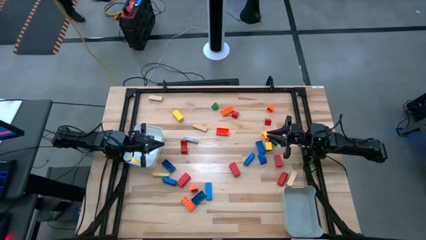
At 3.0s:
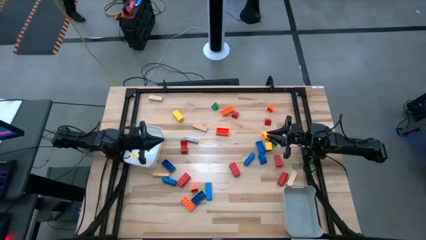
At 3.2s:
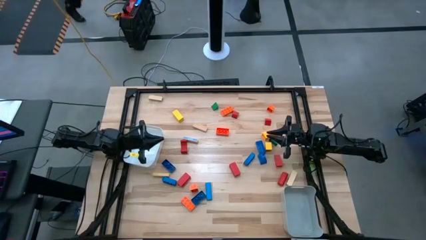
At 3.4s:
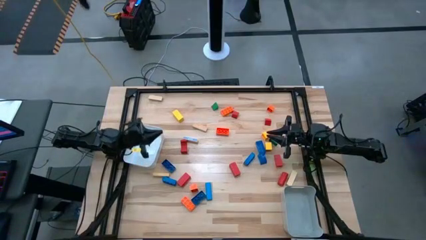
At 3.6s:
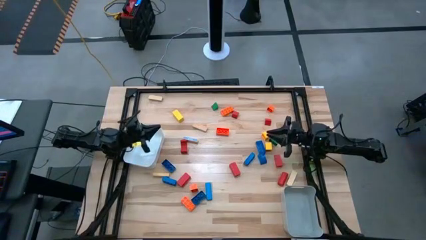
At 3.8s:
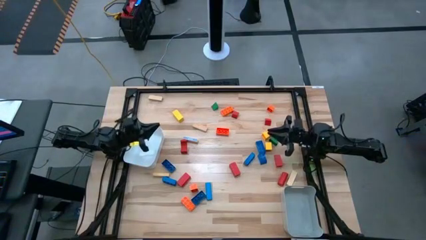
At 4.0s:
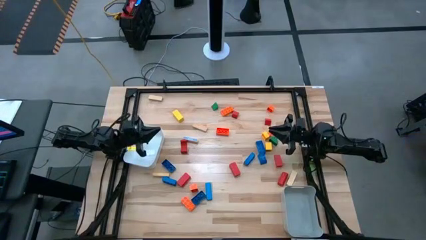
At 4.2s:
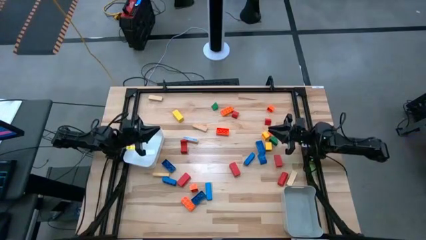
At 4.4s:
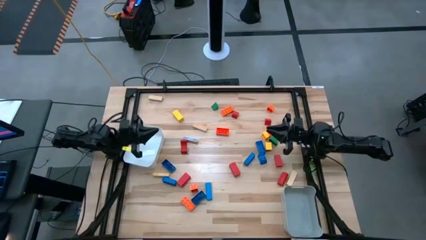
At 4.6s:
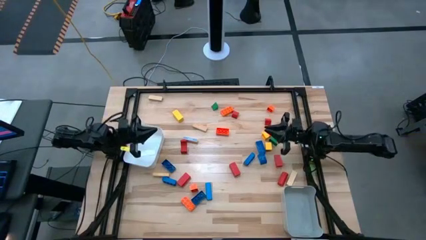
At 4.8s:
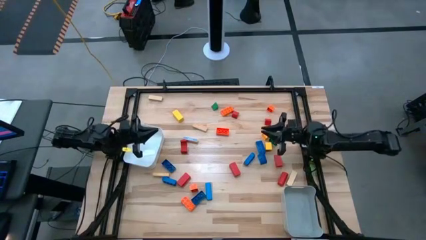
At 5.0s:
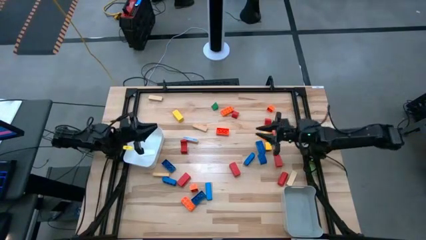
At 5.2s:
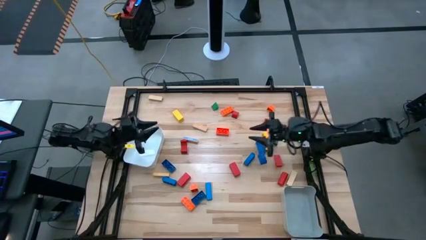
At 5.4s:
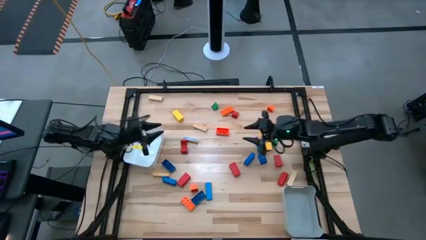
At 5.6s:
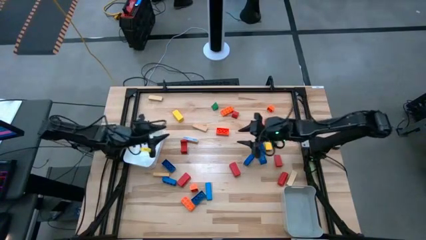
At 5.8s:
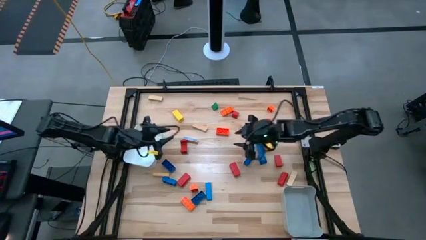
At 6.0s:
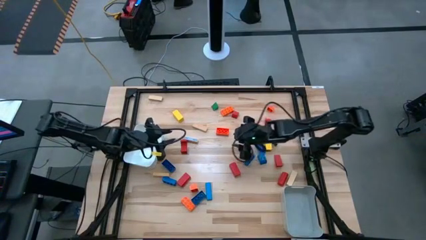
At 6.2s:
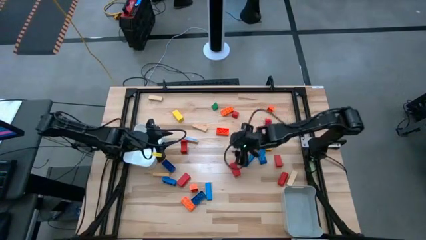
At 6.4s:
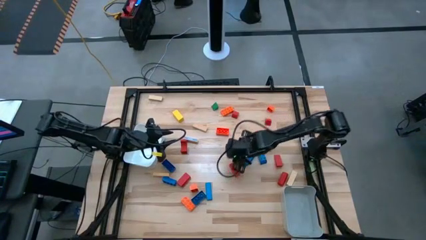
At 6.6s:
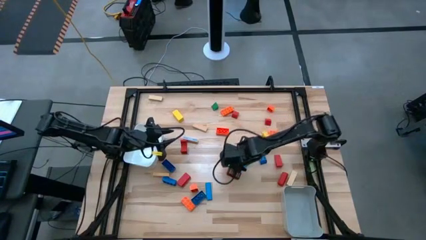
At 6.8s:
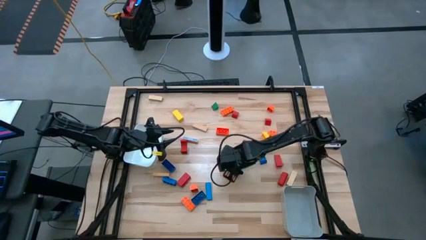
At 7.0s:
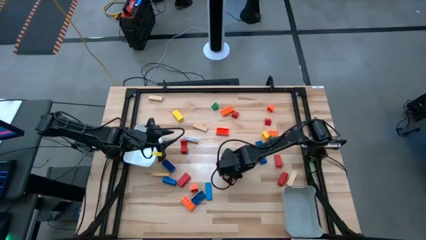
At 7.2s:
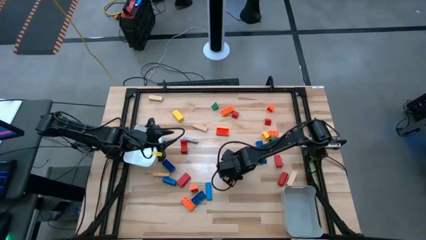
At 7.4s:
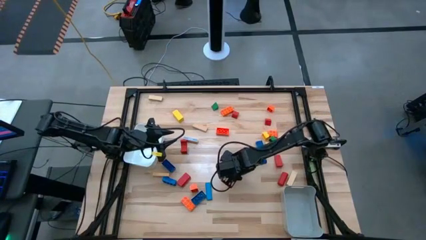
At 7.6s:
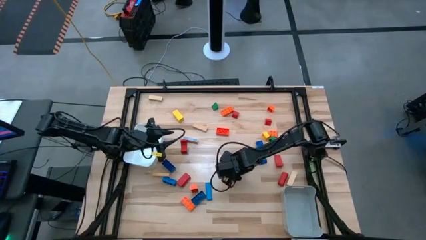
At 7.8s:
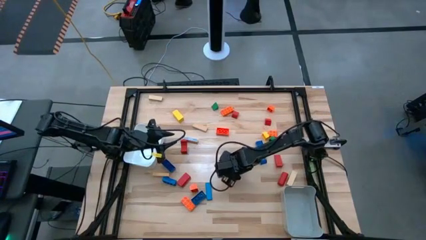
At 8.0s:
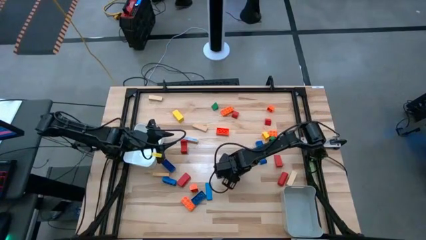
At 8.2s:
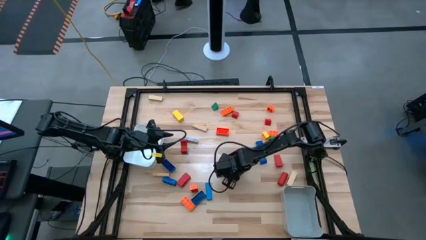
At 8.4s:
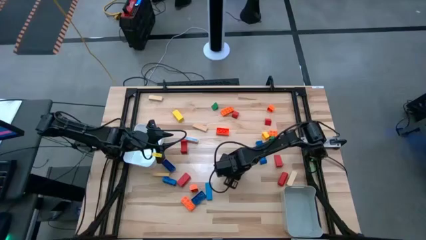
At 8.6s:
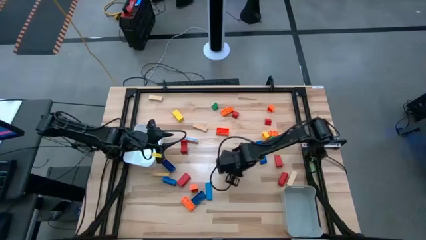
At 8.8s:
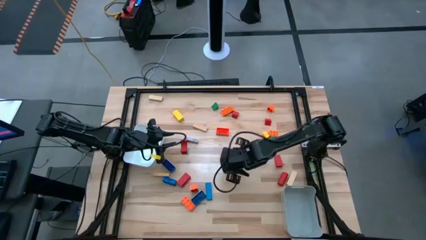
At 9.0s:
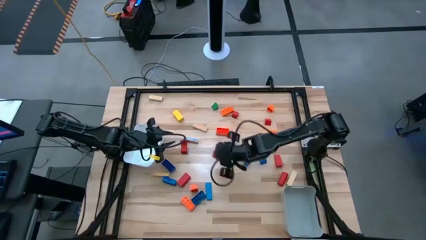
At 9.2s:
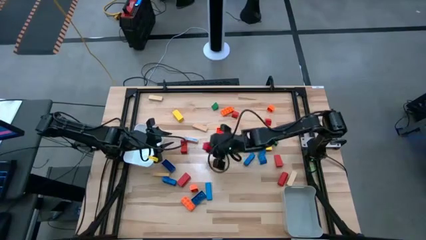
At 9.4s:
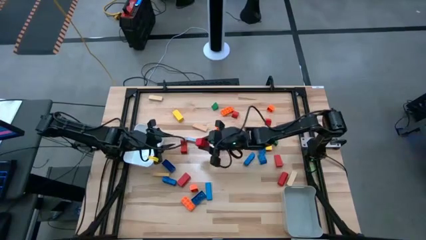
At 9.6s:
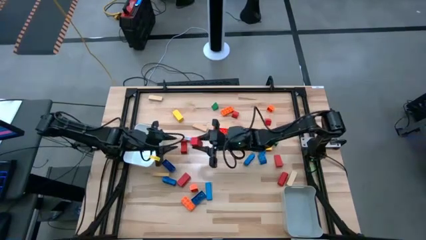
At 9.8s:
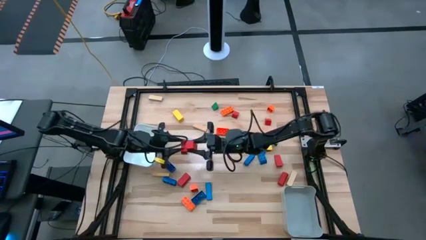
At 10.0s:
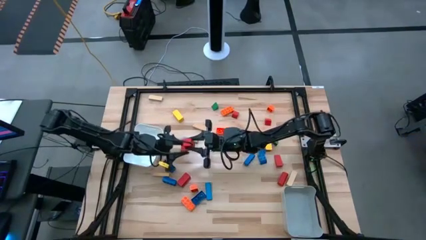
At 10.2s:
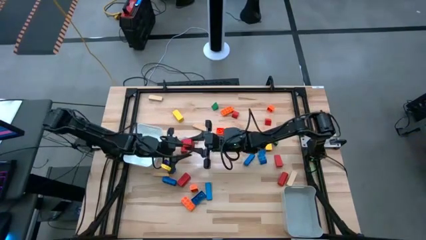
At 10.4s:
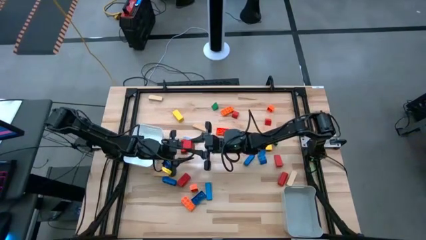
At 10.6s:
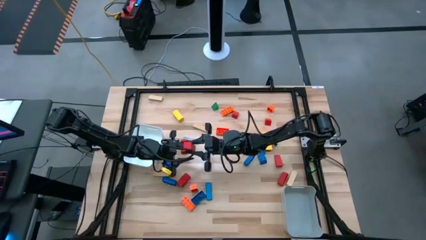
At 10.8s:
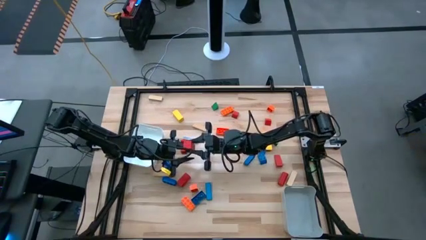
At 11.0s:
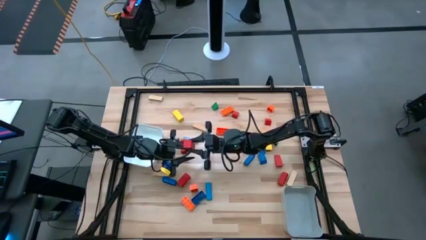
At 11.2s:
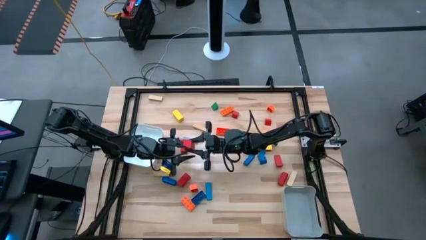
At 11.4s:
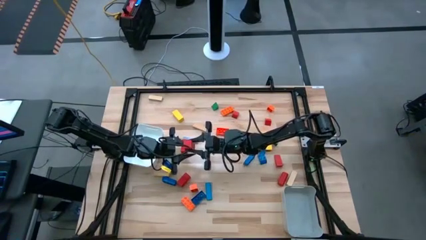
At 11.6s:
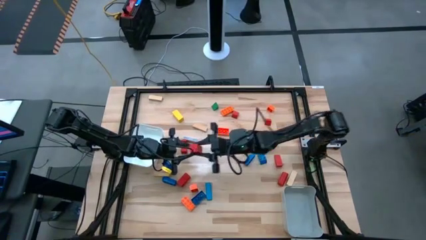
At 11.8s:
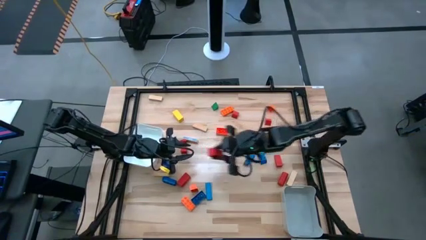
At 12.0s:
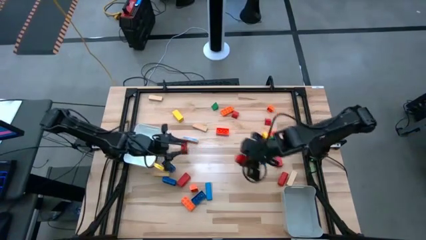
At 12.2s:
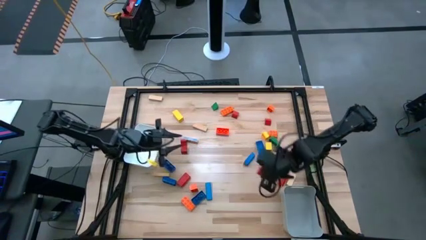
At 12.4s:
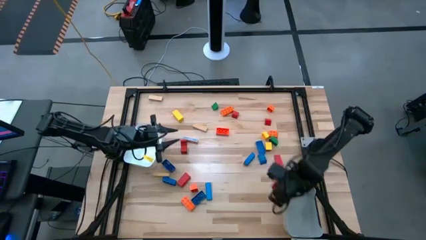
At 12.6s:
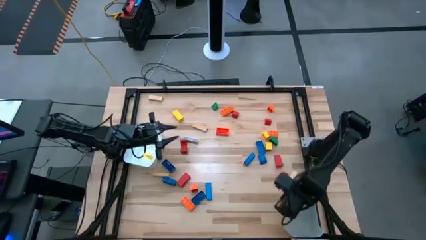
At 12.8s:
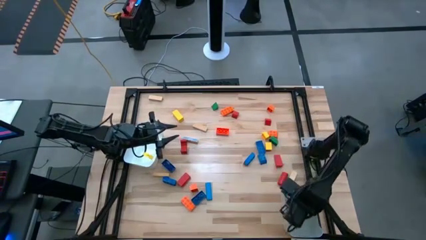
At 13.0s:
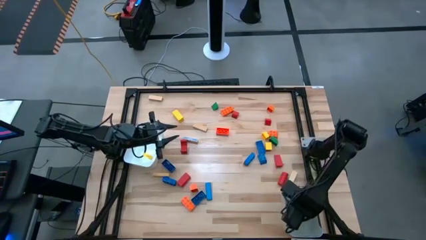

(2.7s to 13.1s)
Task: Sort blocks by size
Put the red large block into the gray bin

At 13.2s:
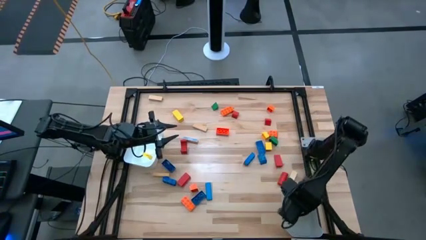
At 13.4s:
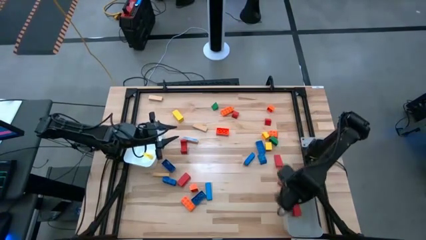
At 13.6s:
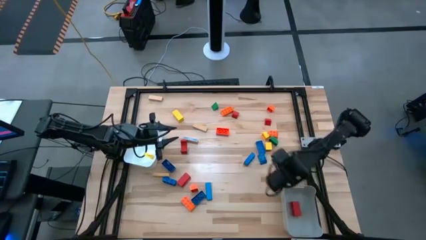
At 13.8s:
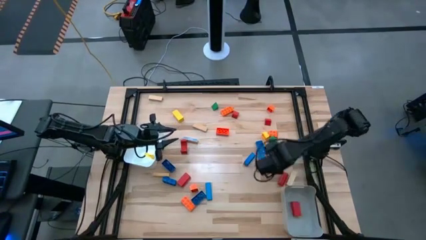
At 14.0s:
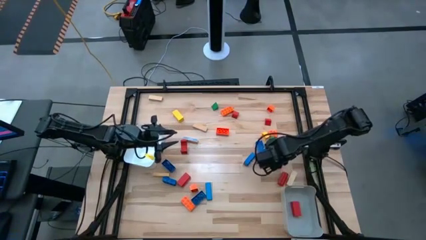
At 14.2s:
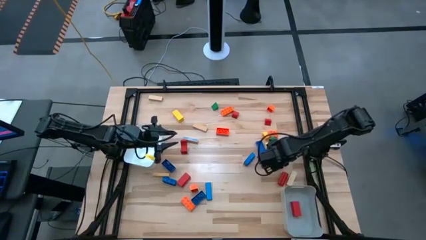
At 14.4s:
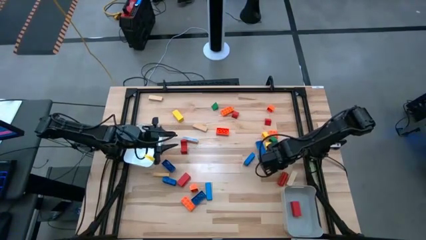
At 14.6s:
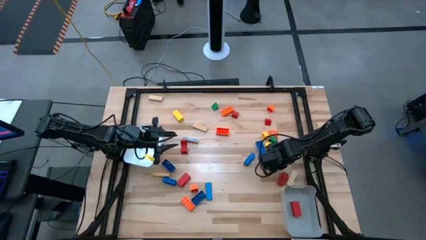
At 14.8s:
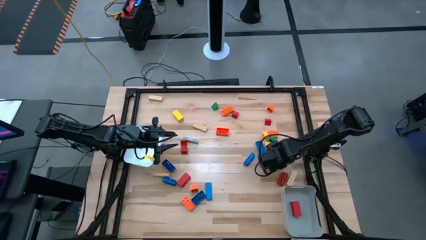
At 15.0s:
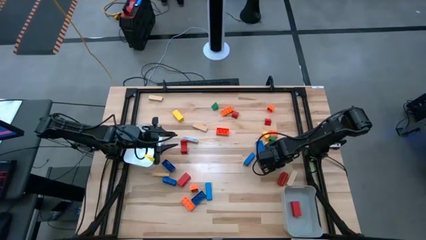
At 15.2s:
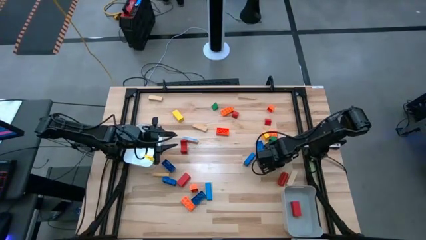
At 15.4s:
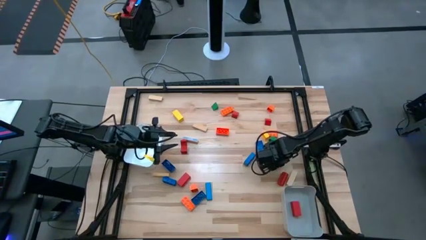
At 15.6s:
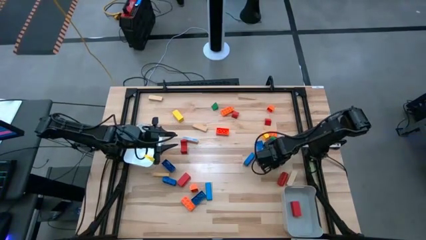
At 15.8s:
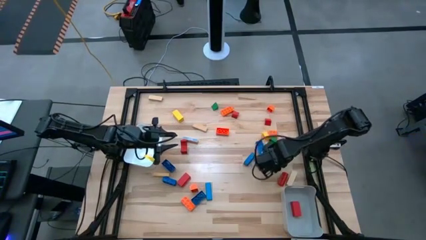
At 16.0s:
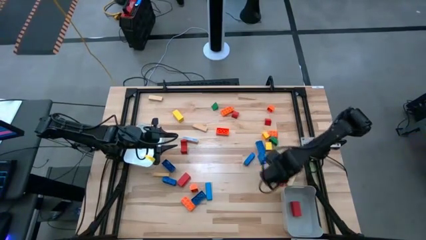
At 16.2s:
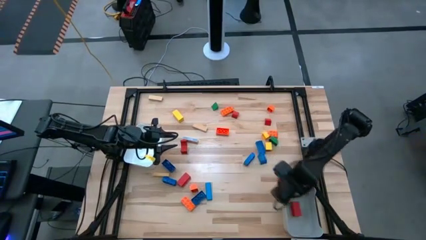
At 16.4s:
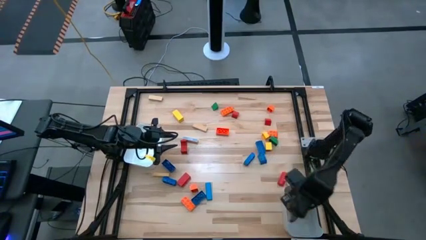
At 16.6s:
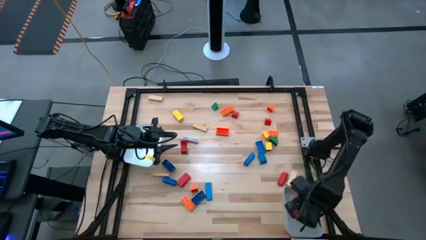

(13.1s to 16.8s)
Put the red large block into the gray bin
